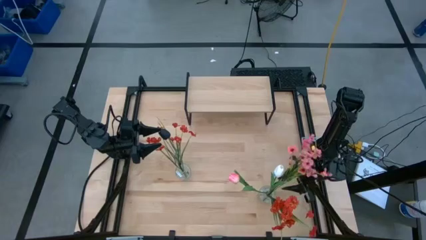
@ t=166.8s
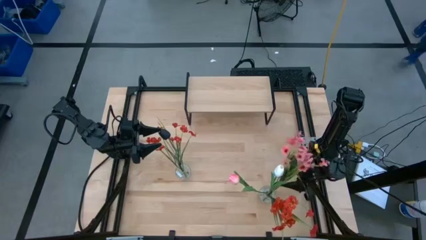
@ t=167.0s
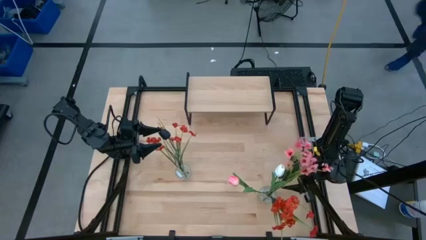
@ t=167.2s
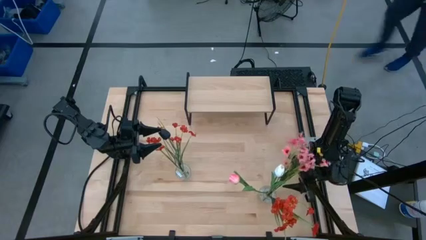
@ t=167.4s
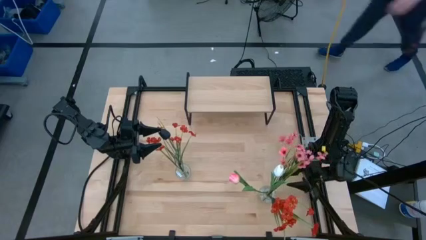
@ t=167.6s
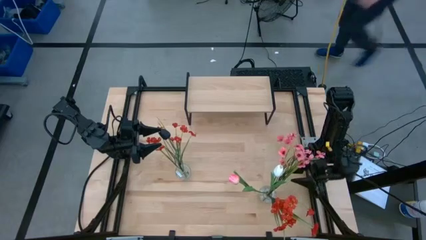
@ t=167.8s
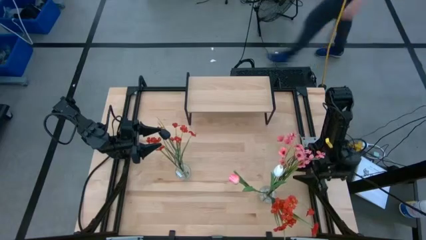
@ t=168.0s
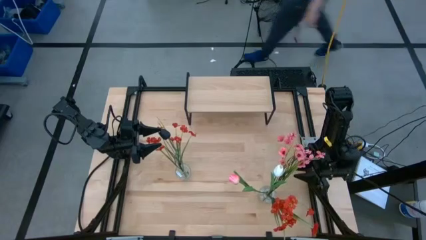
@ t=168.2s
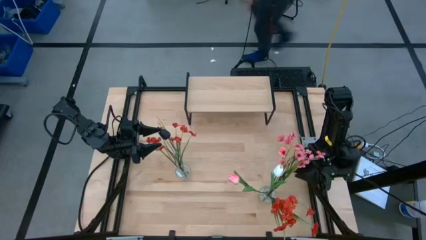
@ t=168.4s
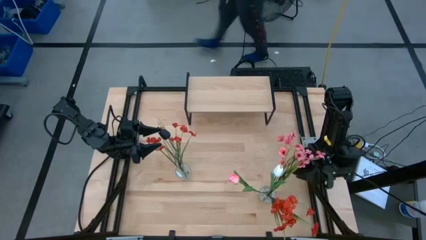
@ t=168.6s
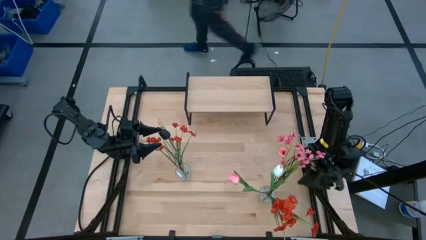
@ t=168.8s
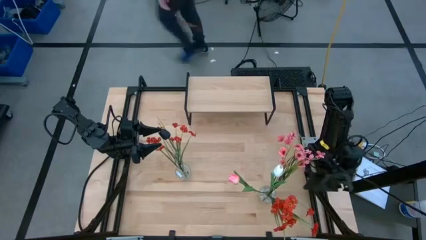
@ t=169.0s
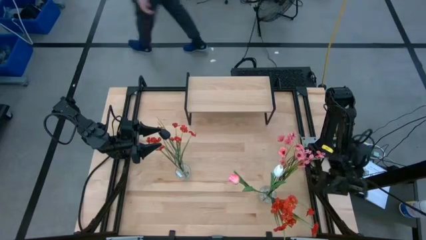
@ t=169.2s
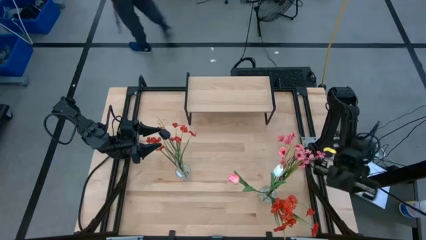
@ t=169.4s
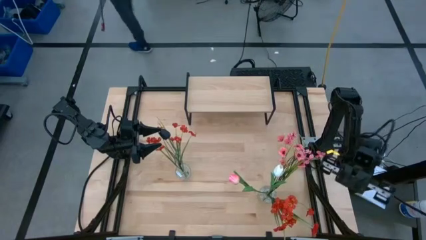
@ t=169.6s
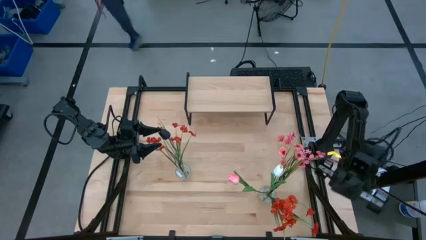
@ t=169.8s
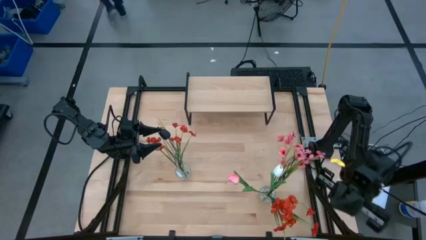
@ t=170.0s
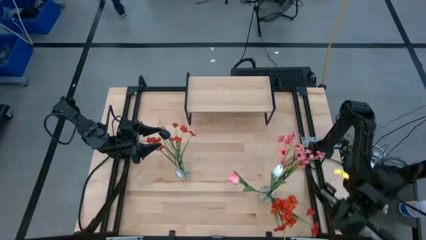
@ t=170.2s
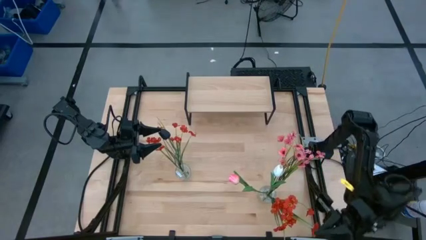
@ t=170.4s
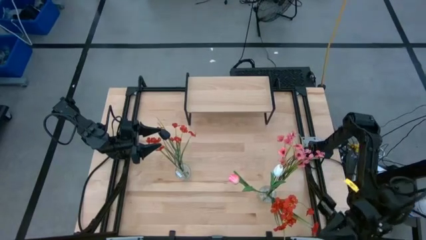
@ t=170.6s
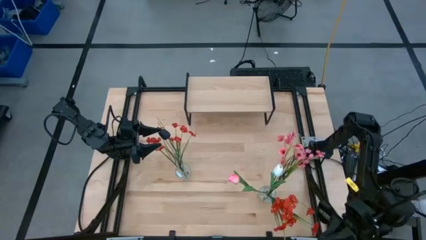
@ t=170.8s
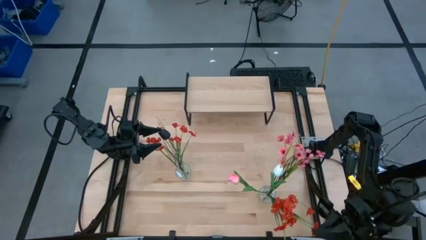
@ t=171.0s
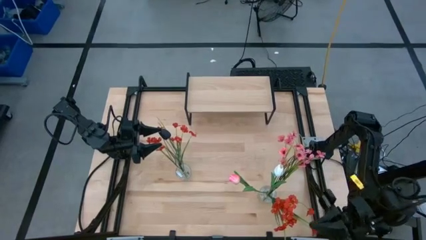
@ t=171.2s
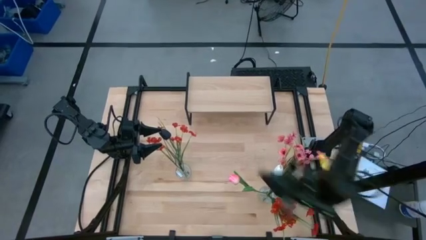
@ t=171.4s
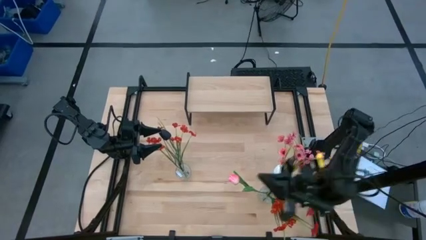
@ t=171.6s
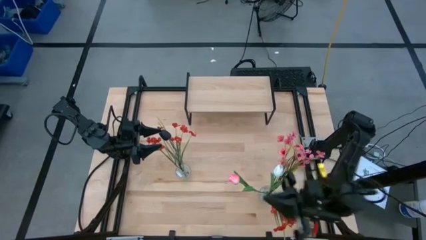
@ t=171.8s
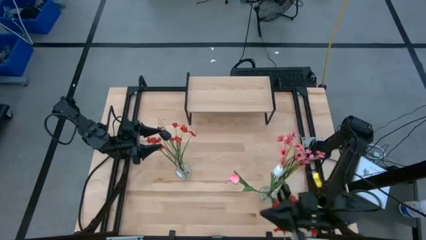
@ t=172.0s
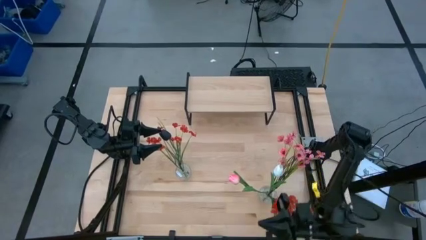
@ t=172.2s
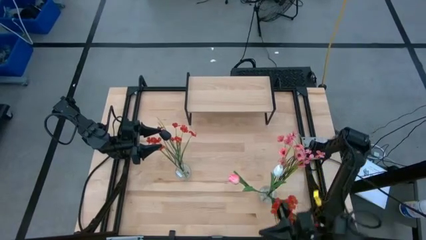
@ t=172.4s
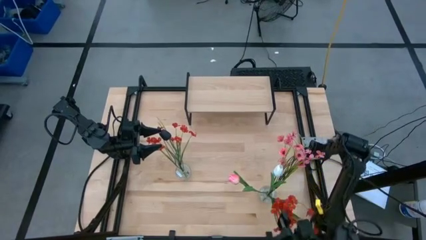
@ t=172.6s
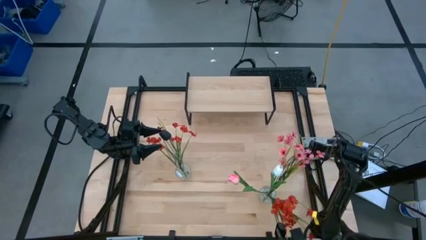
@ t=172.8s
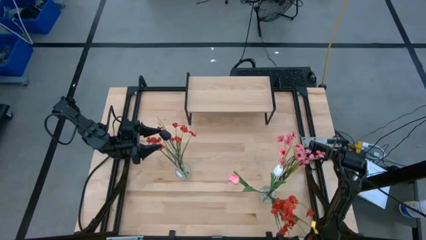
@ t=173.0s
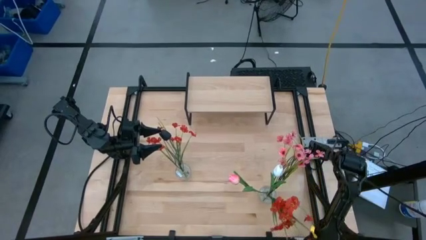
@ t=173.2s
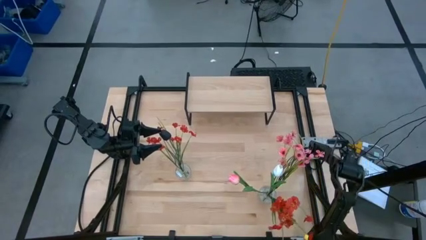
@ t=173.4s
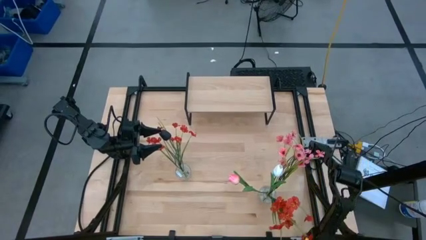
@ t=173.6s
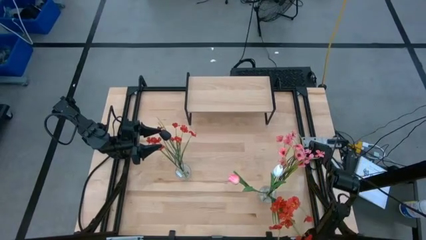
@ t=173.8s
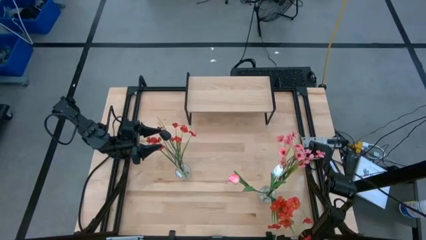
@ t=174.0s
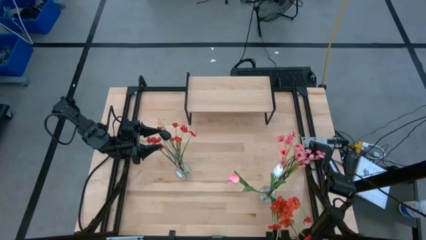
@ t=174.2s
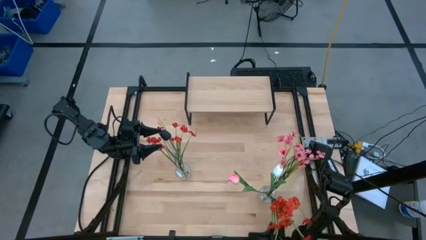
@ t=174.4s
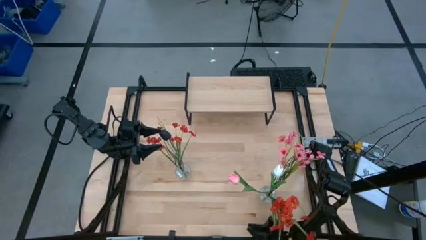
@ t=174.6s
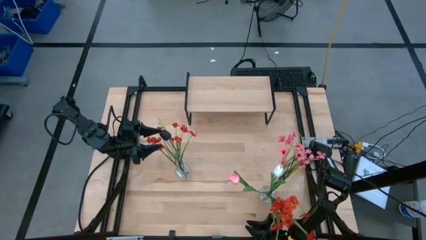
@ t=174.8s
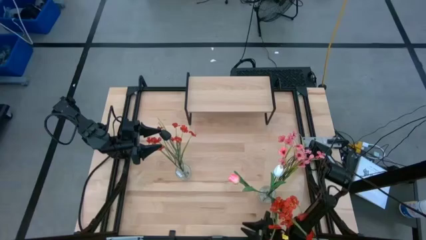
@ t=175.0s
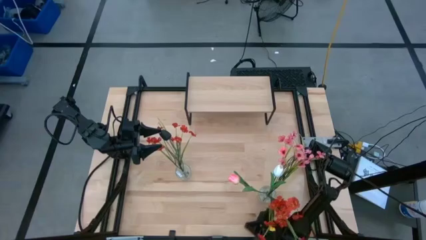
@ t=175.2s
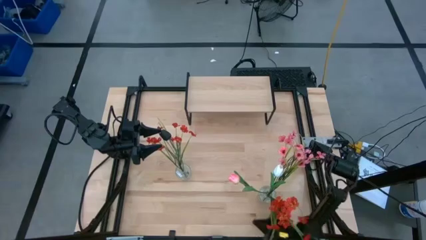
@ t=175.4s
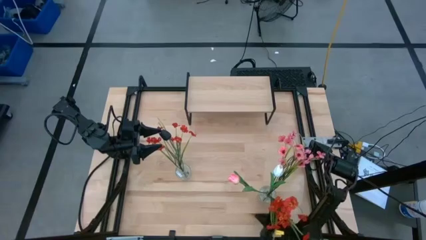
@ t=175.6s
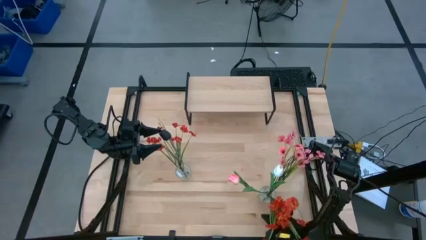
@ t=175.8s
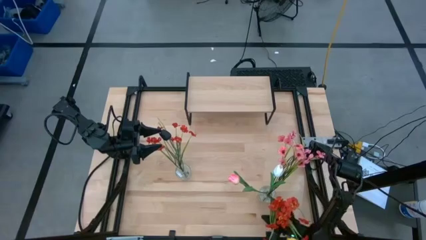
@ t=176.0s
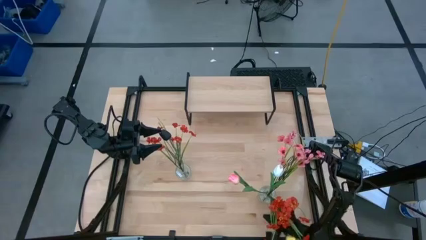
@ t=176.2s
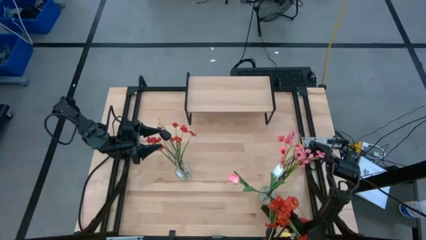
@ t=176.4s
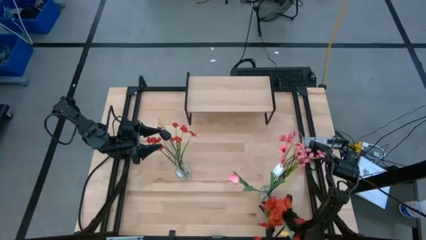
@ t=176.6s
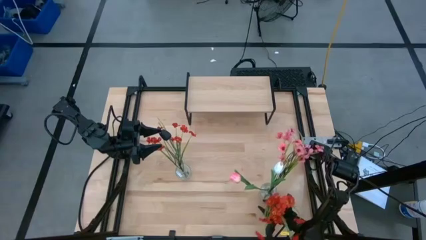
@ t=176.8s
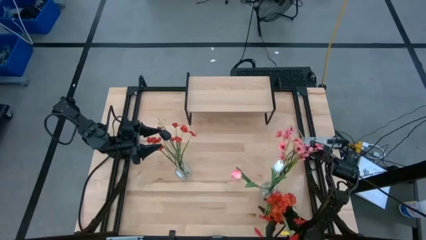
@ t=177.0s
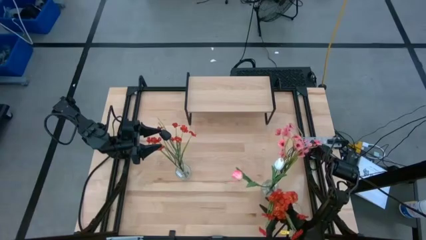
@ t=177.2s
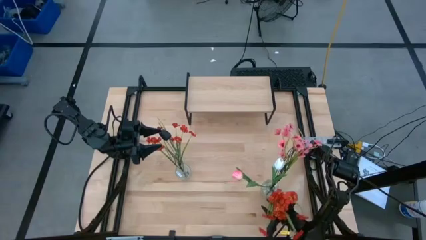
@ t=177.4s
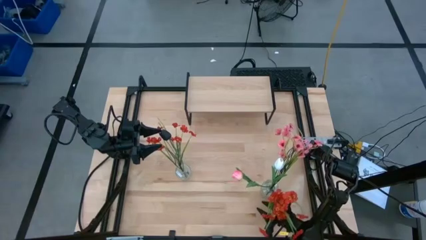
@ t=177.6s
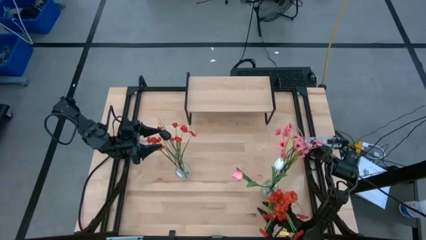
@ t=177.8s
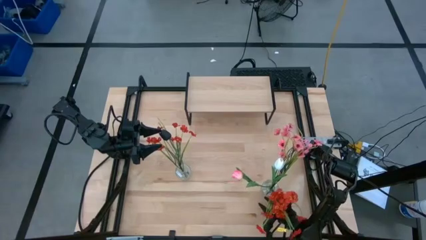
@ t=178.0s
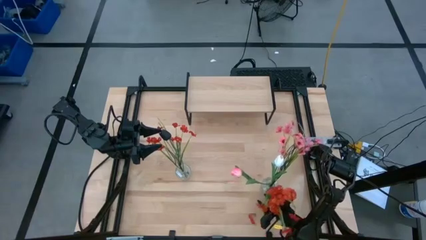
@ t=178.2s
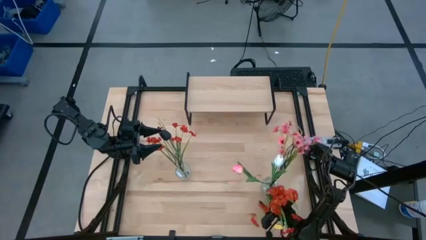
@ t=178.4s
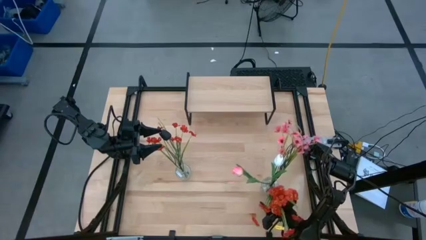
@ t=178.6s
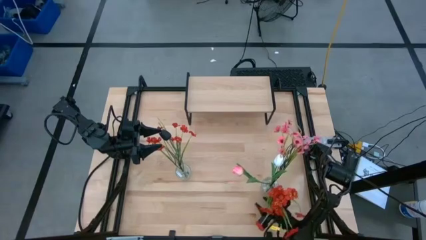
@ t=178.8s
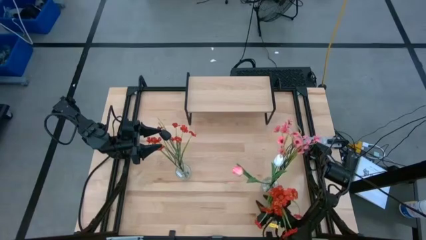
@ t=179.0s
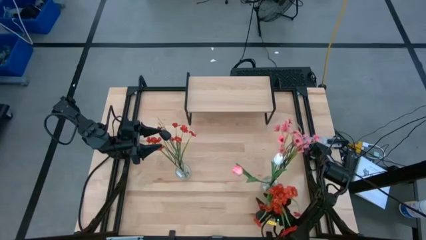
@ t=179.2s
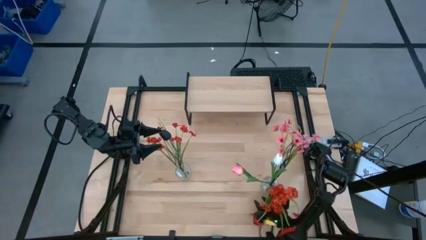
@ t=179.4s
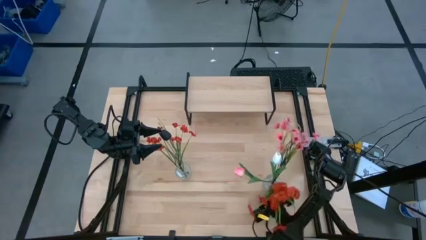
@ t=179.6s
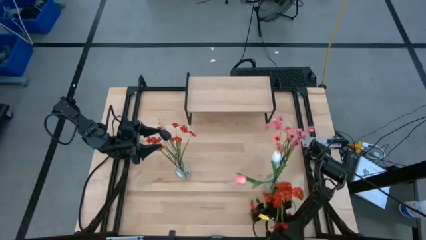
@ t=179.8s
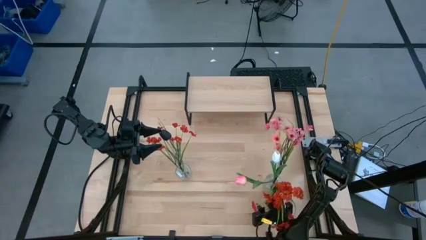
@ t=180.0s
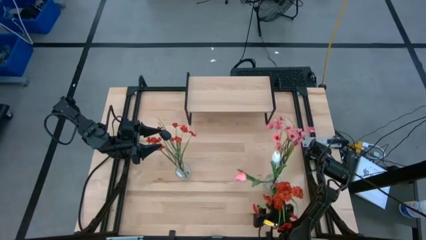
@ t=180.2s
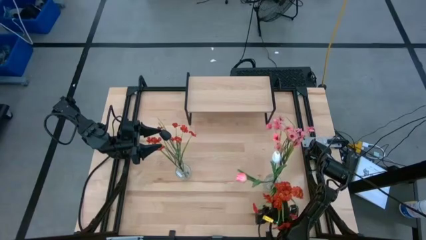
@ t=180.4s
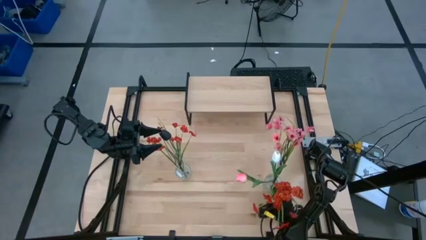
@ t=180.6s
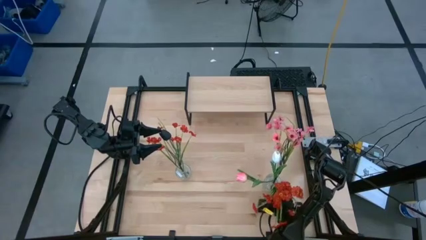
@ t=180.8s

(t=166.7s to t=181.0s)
Task: Pick and place flowers into a vace then onto a shelf
Put the right transparent vase with flowers on the shelf
